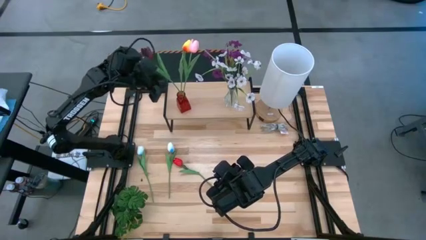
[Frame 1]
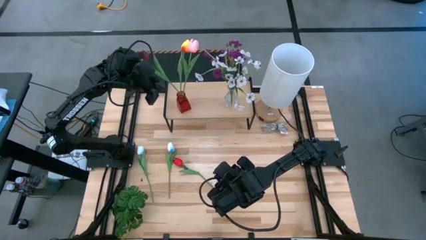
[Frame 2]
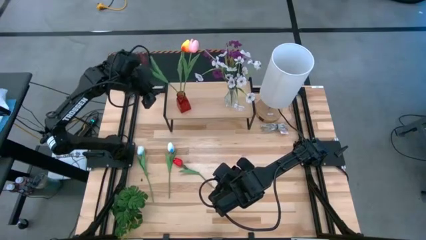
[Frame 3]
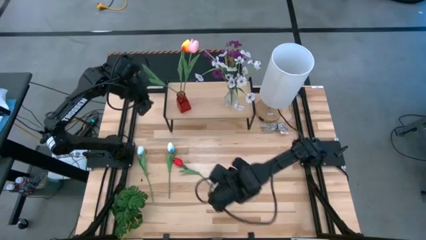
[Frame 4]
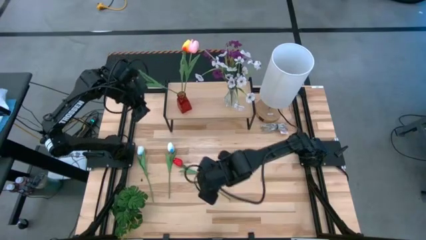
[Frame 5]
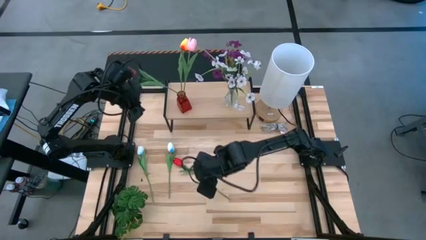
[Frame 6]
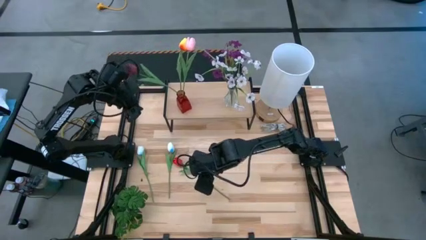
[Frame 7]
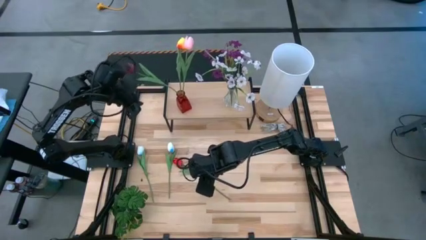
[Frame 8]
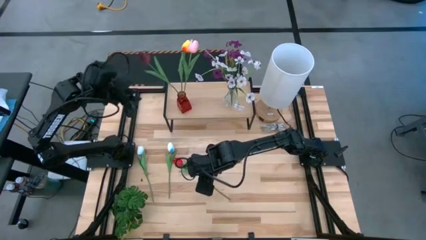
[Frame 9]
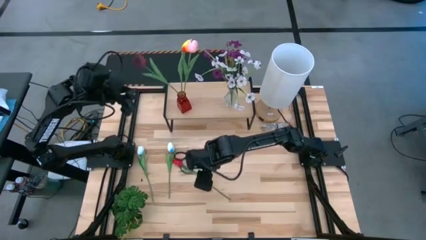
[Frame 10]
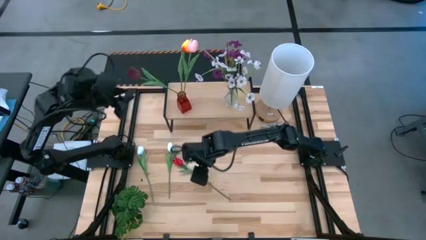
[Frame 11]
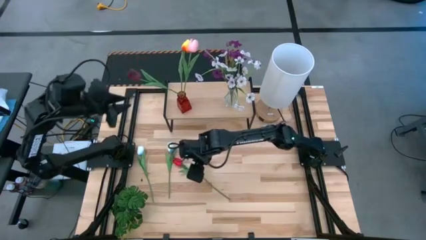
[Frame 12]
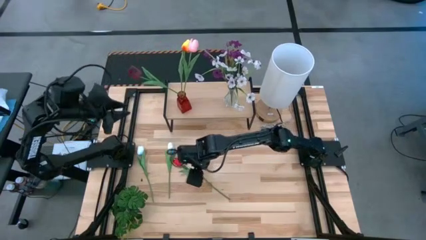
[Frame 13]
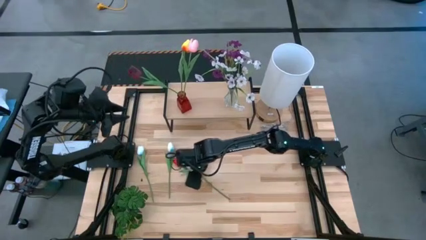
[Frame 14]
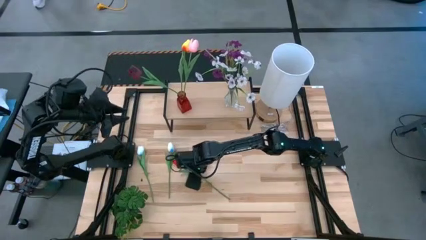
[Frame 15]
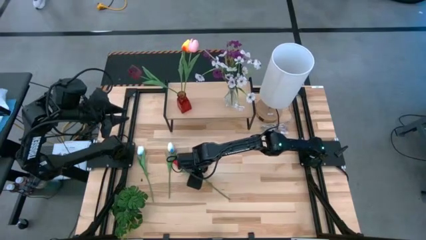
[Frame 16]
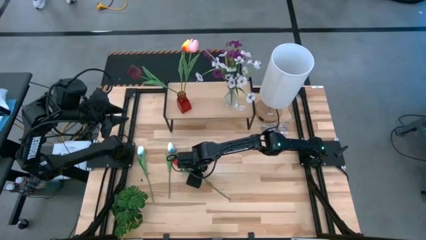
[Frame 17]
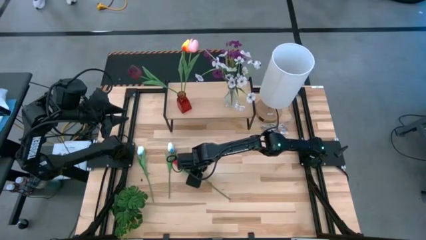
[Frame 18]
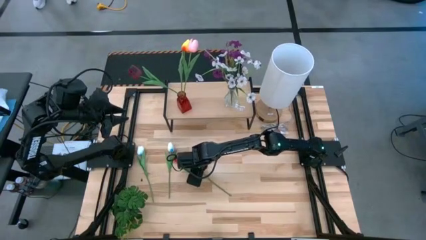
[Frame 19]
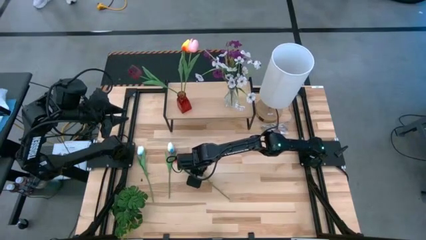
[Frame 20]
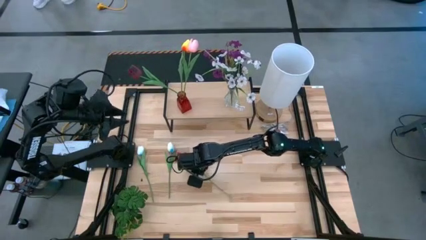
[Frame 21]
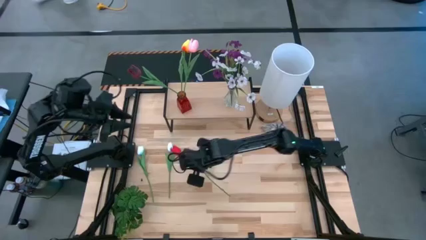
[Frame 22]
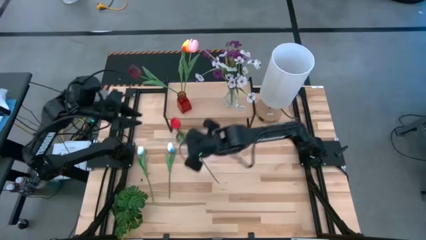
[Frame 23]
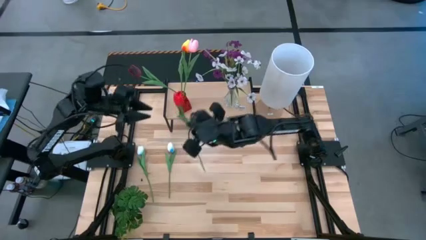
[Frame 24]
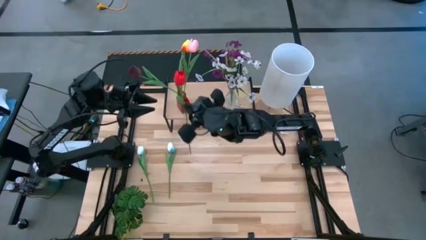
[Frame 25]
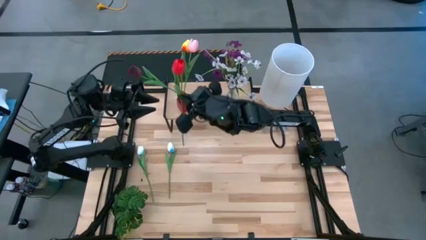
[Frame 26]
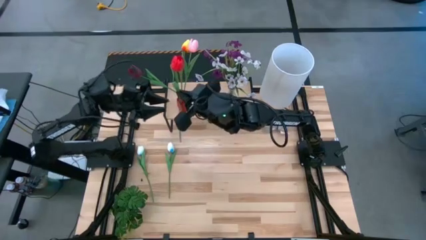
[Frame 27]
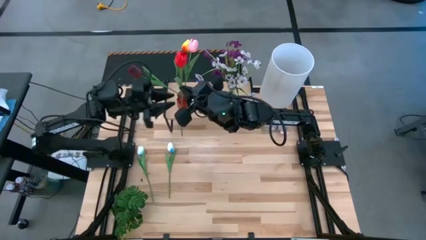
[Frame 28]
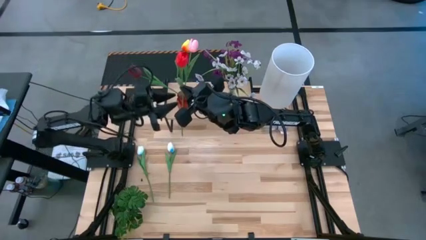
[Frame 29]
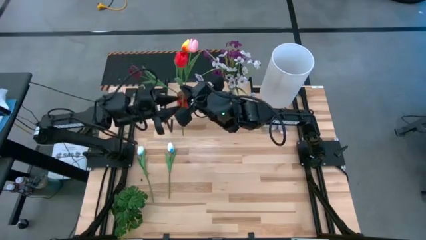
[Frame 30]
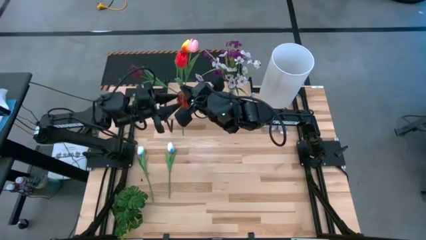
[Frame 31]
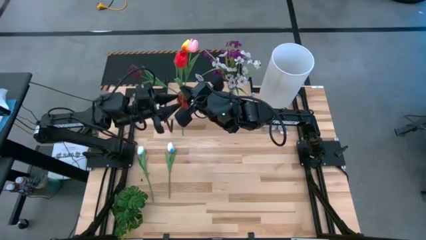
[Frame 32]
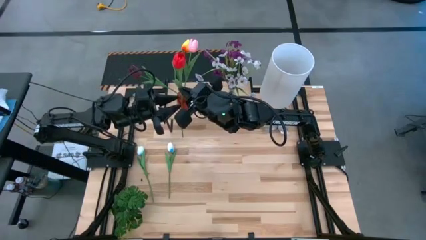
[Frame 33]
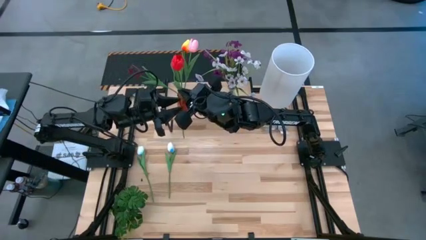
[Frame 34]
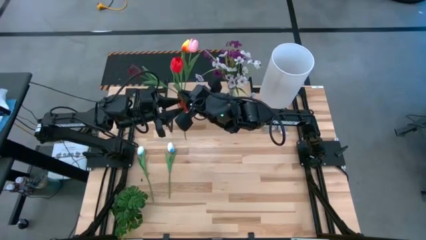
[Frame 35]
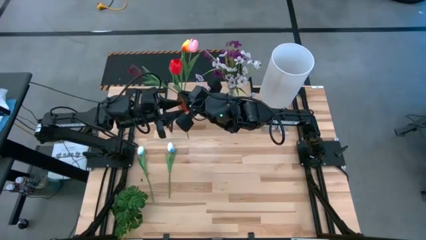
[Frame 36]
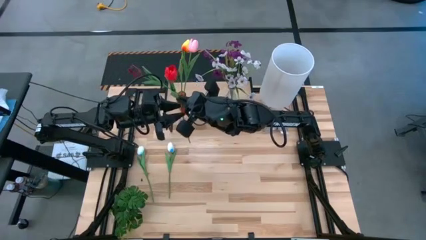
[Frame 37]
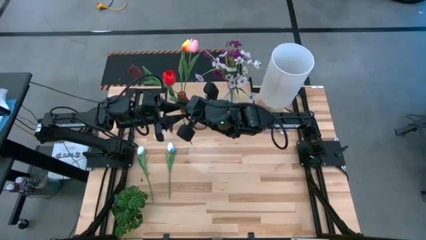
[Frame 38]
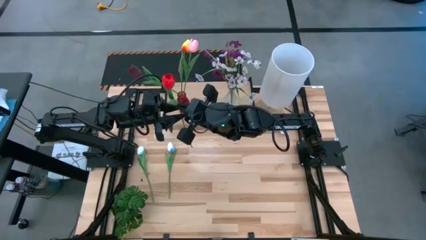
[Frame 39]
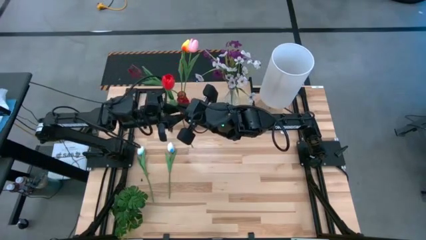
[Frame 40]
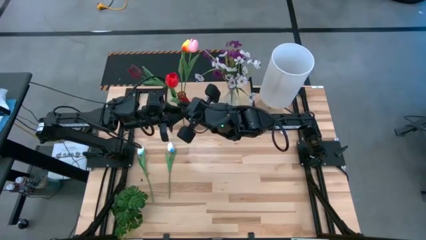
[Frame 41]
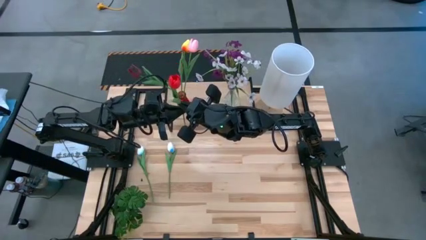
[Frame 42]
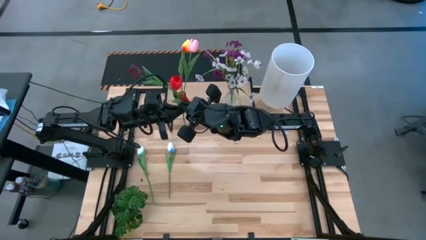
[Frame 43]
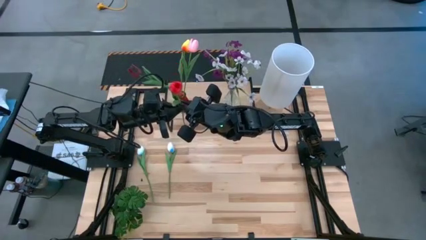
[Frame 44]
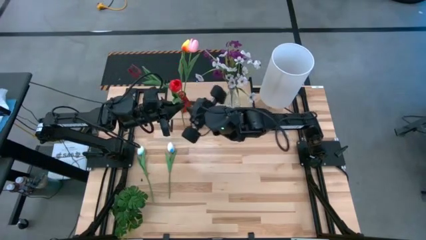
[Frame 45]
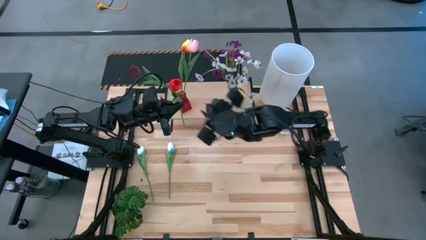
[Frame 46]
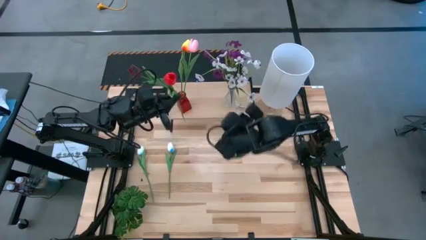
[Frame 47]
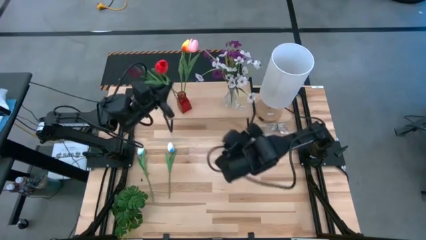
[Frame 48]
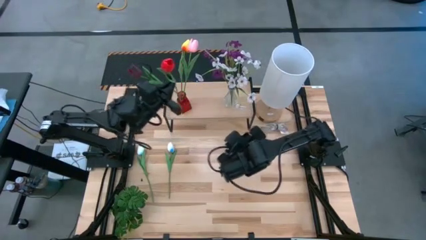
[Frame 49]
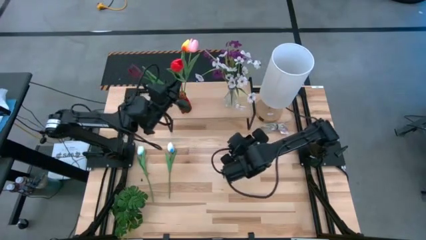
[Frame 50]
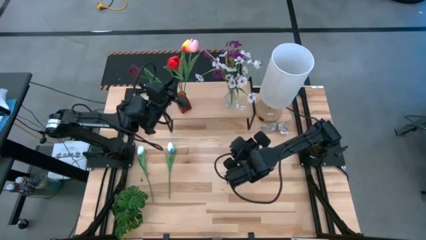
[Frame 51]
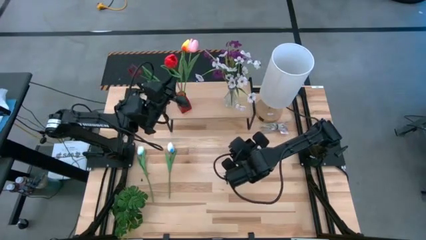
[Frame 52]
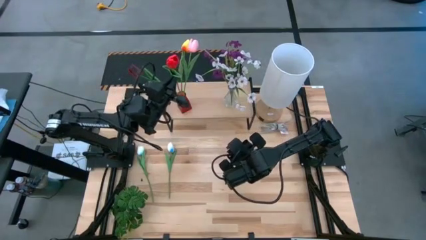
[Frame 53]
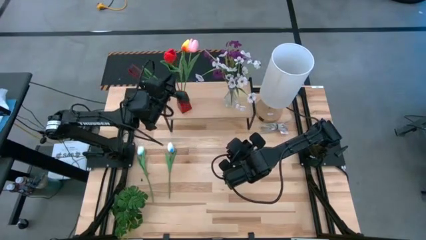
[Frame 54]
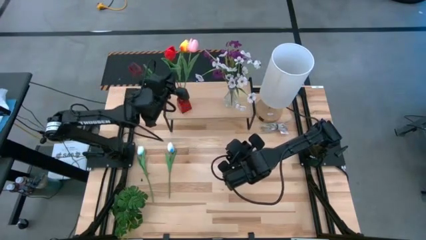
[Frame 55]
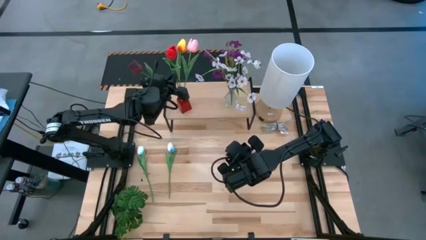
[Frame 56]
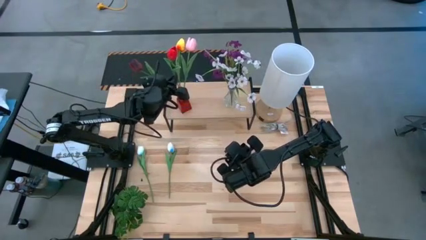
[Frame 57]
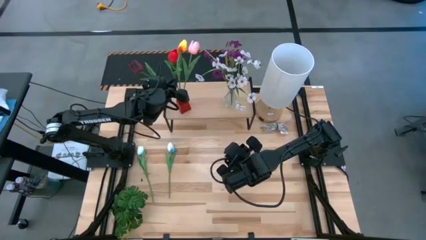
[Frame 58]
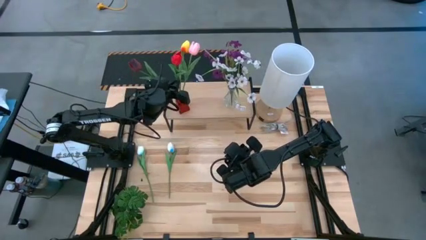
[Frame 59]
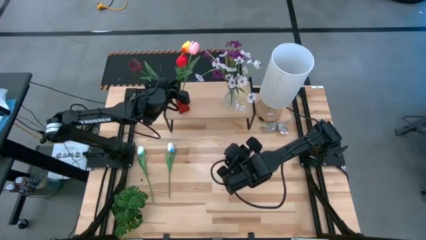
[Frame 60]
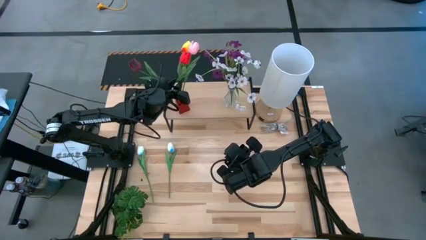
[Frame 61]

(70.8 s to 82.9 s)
Task: Pick and place flowers into a vace then onto a shelf
Put the red flower into the red vase on the shelf

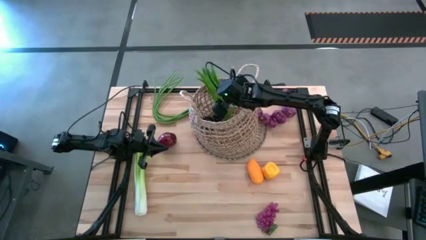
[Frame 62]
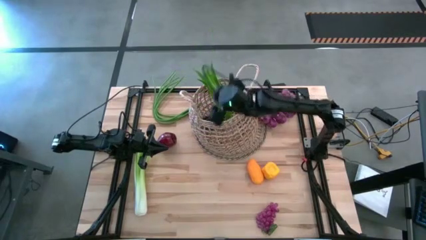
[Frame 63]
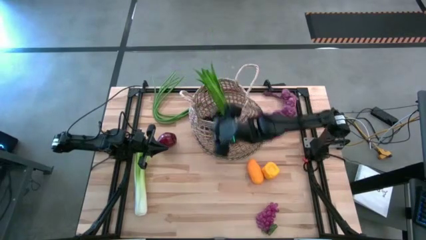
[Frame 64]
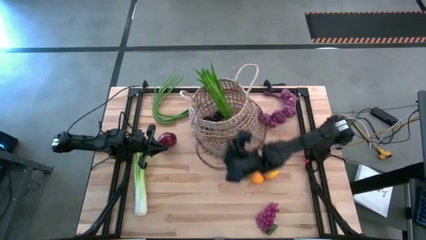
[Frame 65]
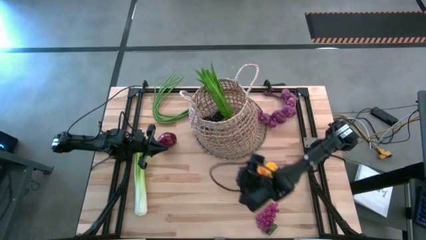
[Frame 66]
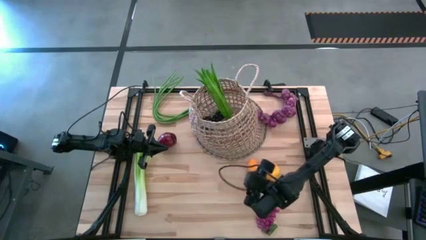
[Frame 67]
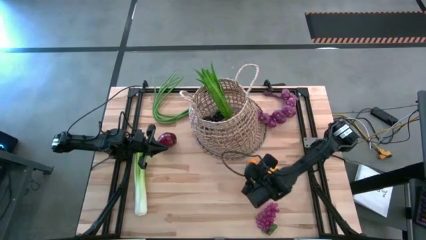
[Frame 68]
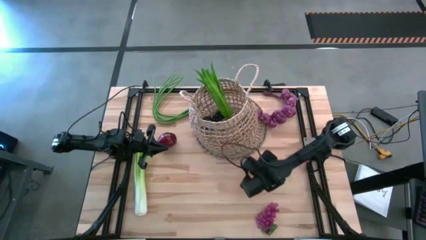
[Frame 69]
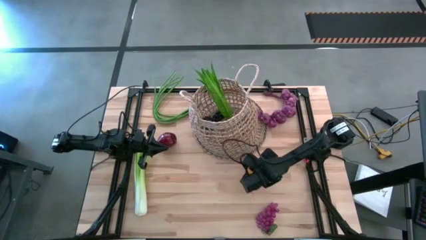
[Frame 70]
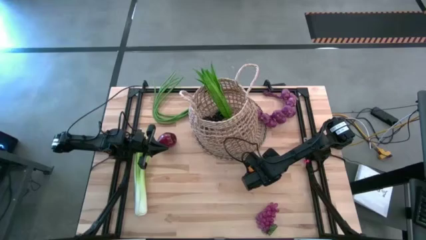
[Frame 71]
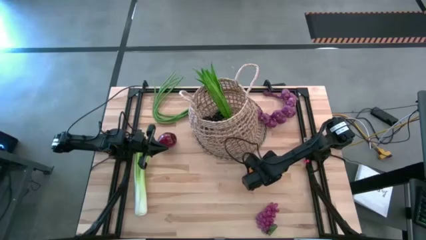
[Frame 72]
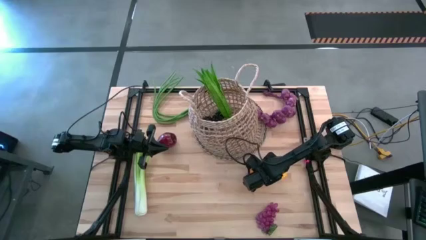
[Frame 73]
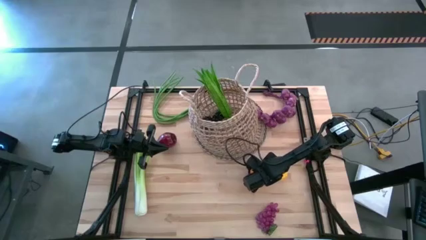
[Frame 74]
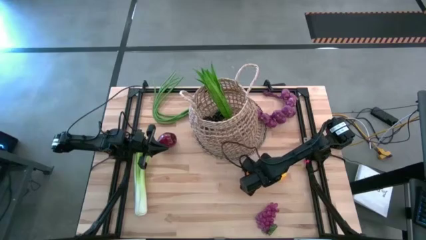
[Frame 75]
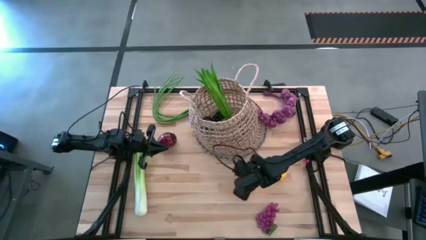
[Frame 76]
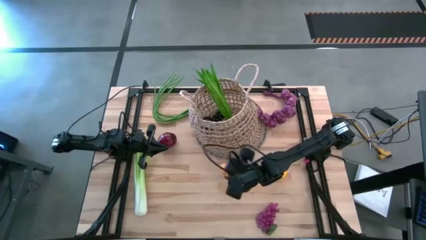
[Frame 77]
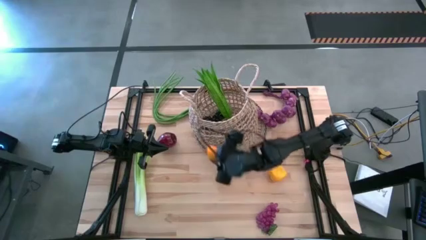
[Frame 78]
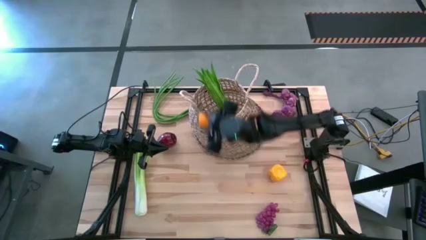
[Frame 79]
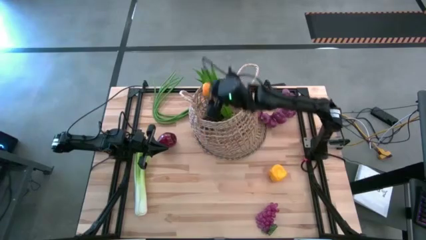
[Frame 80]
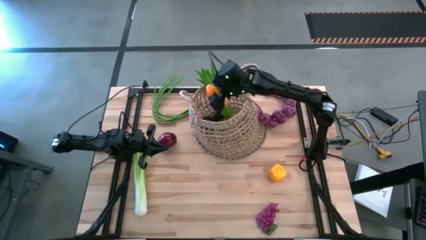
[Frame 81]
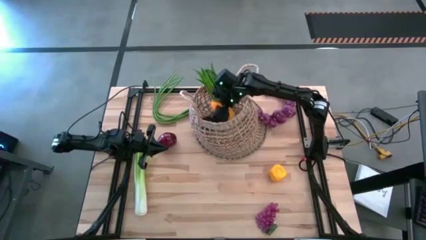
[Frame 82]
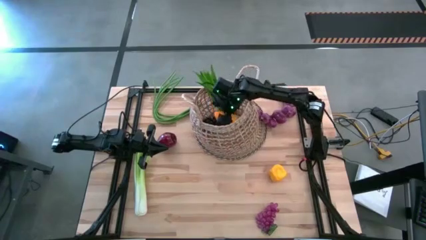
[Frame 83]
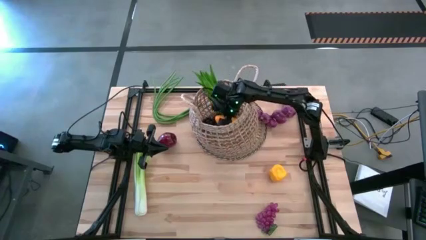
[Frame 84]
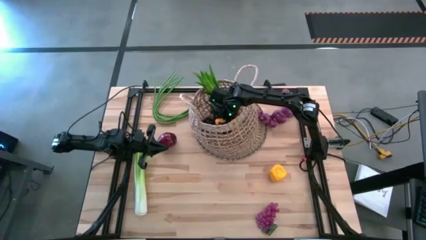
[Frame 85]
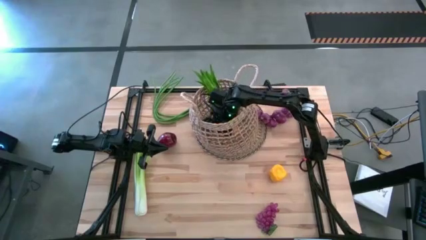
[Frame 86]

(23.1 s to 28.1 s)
Task: Build produce basket
Put the yellow mango into the light brown basket
